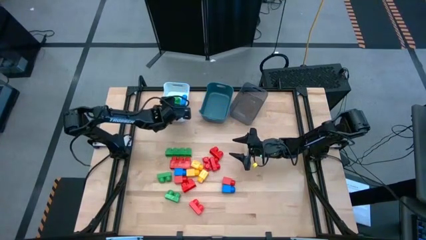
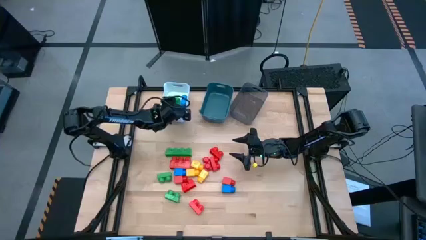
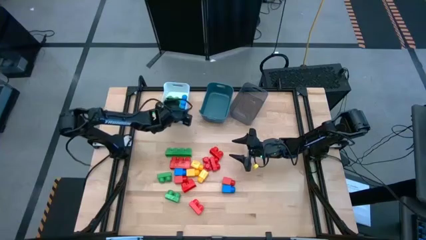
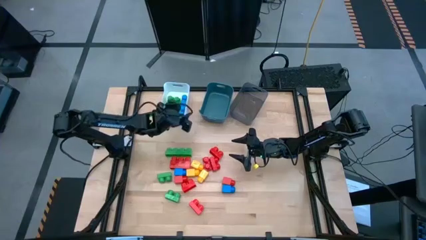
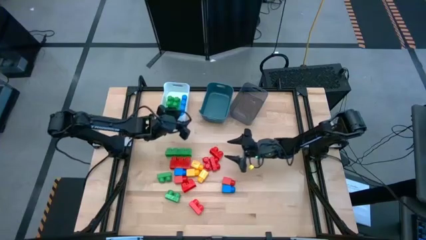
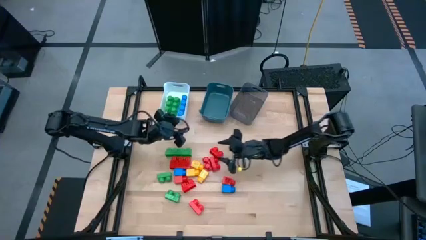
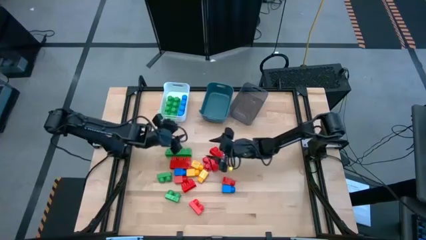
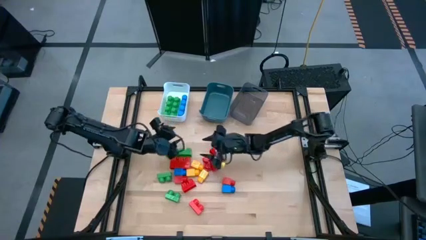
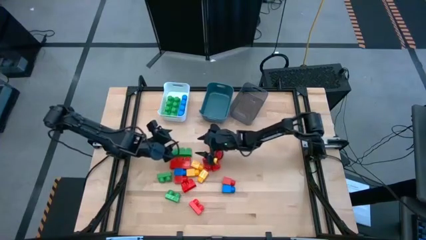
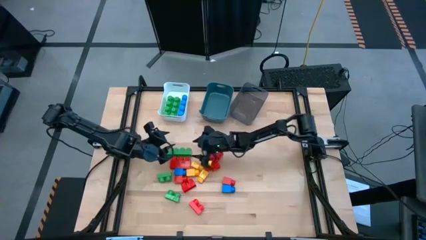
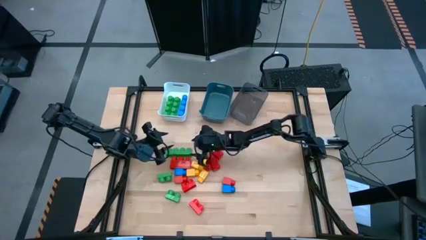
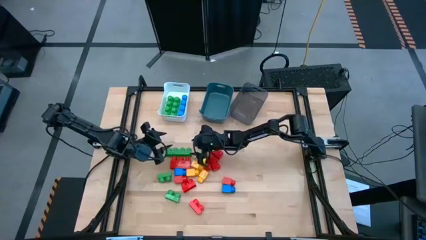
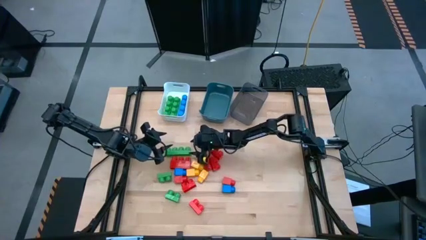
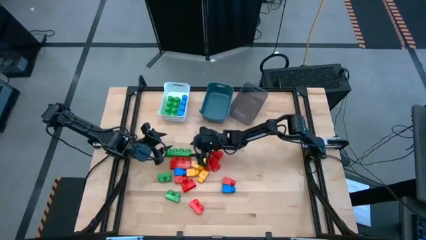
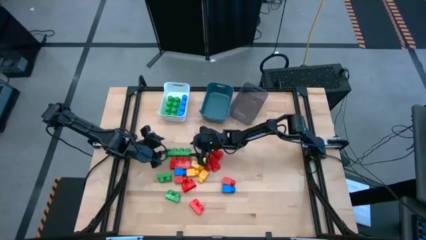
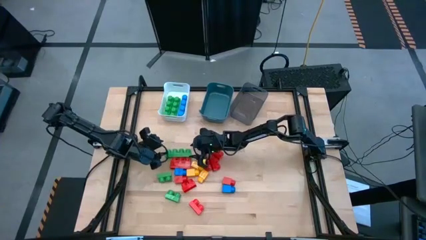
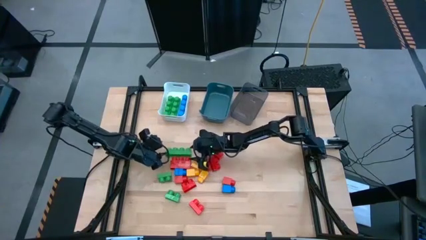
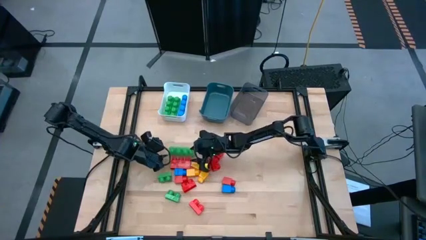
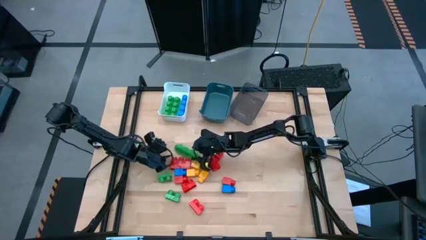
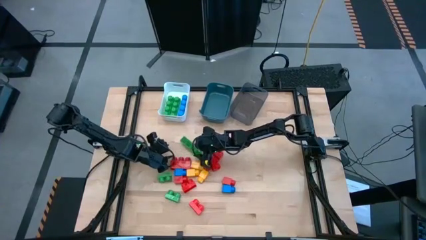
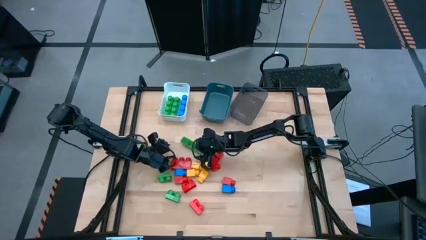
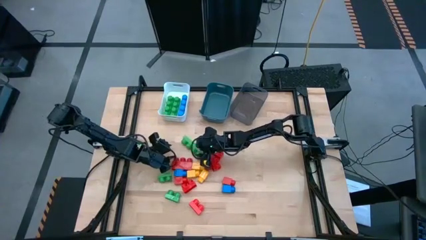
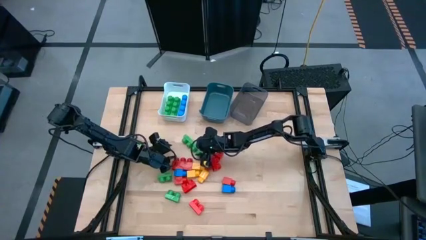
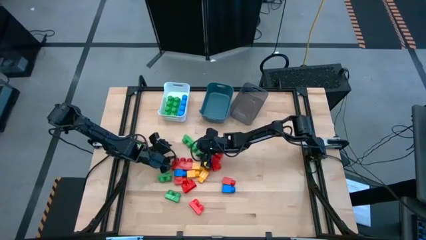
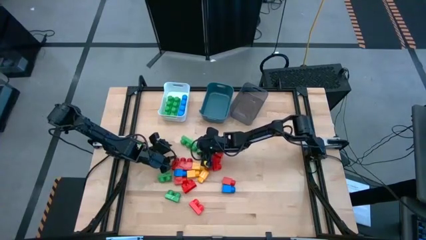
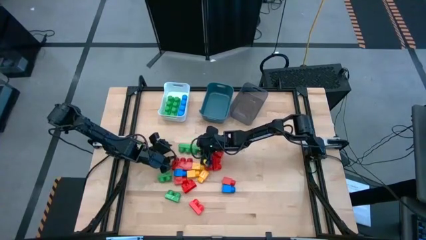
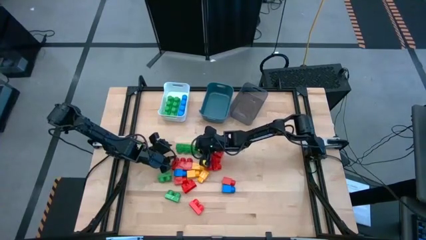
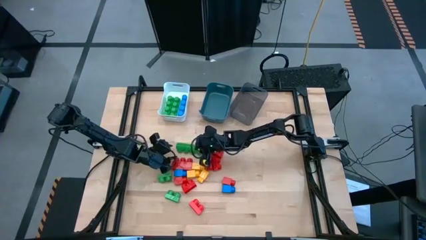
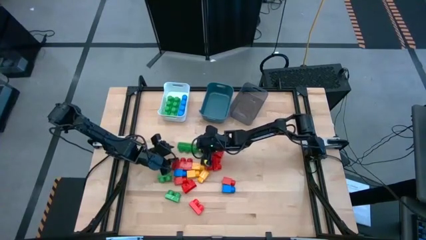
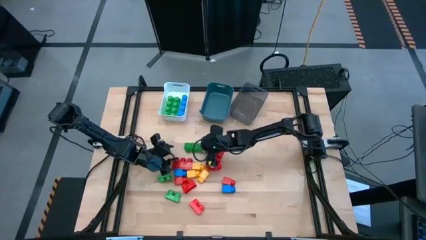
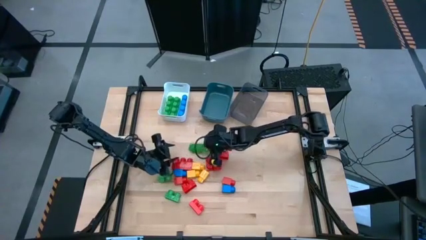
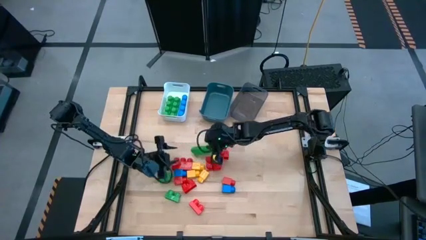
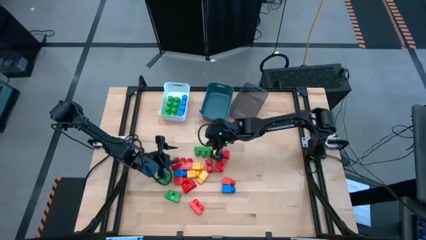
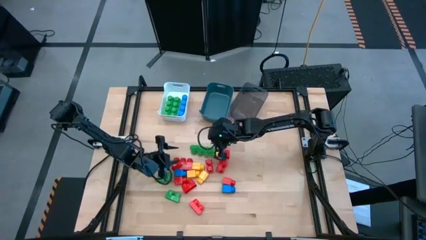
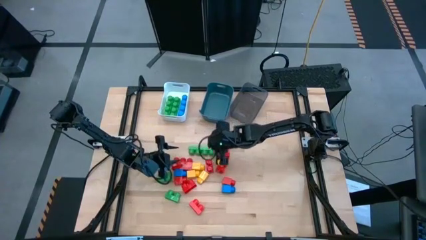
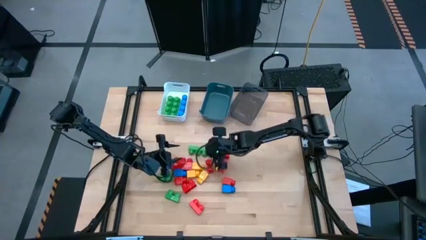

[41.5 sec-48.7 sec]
Task: Sort blocks by size
Put the 4 studs green game piece into the white bin

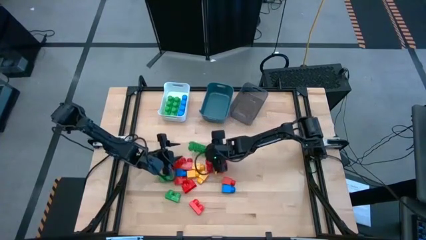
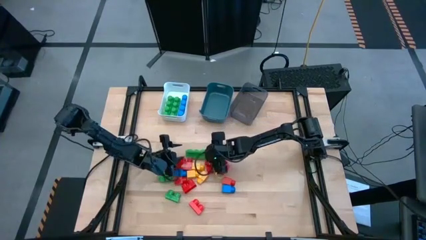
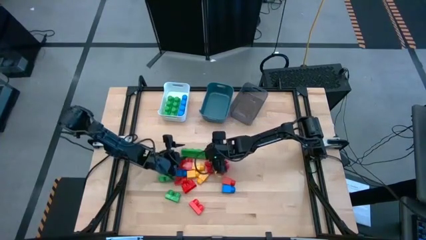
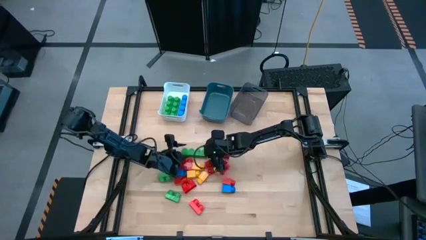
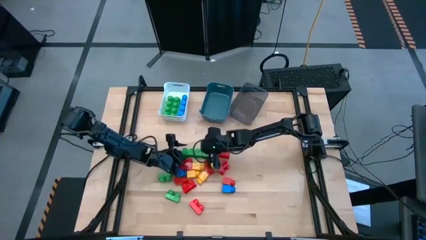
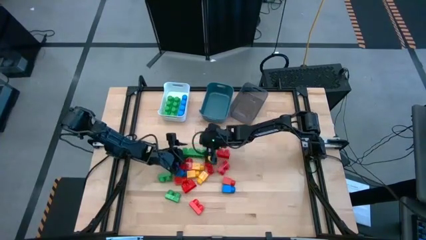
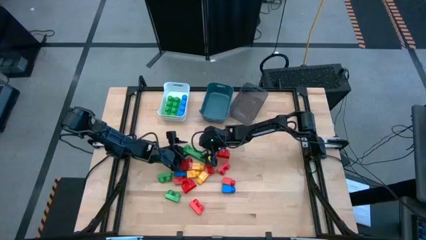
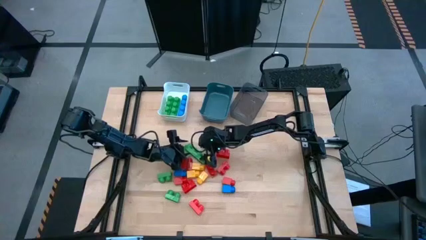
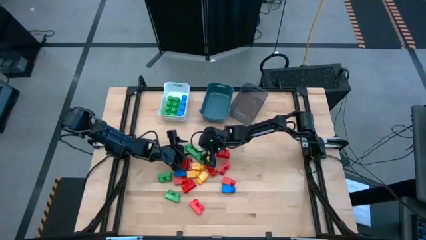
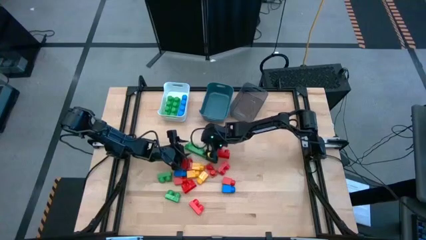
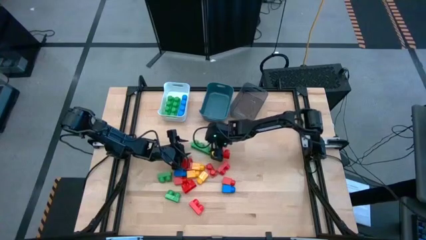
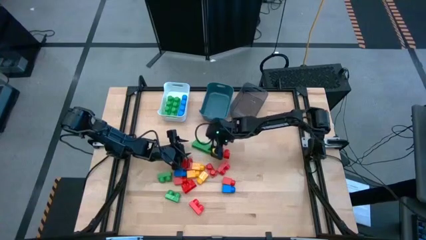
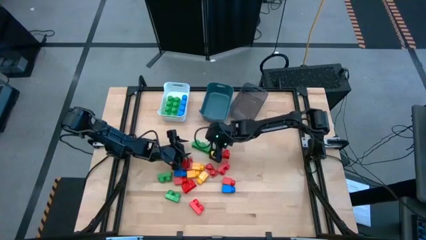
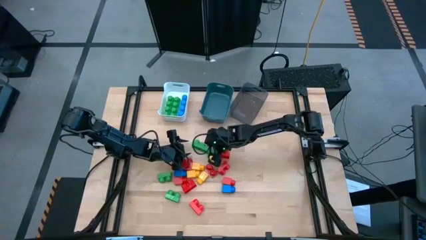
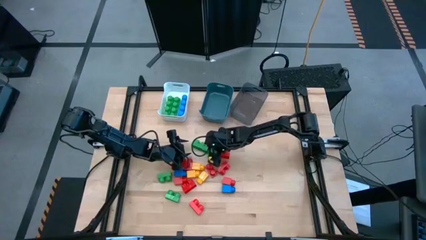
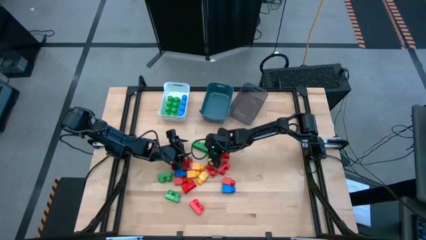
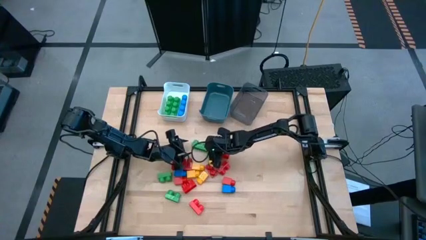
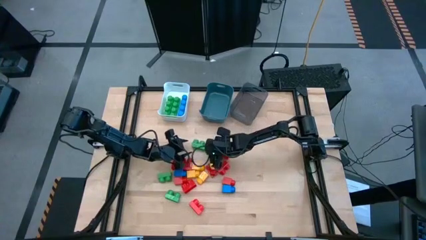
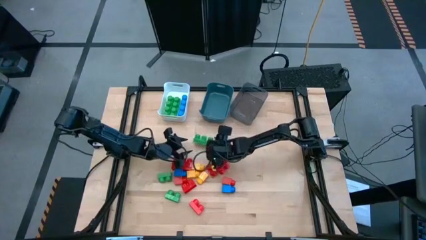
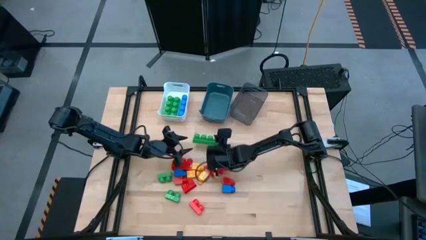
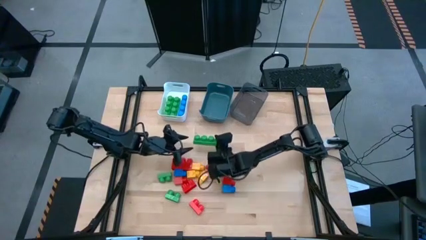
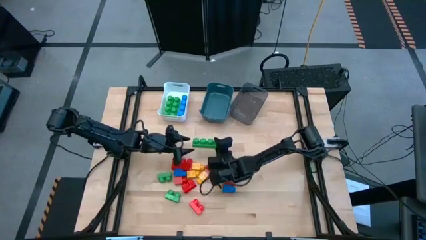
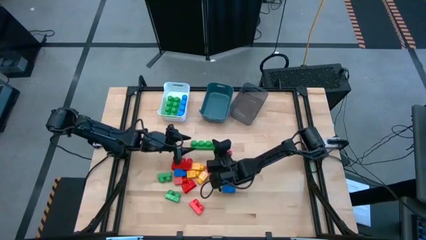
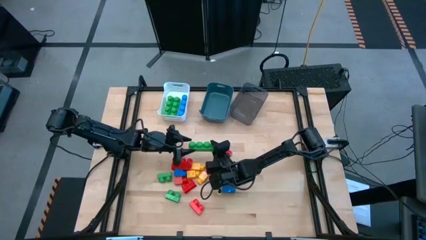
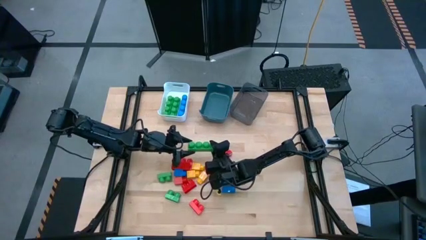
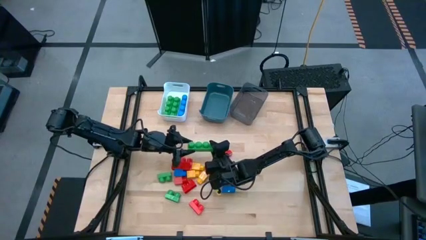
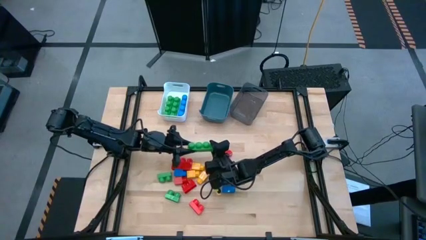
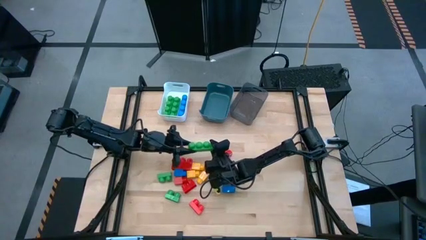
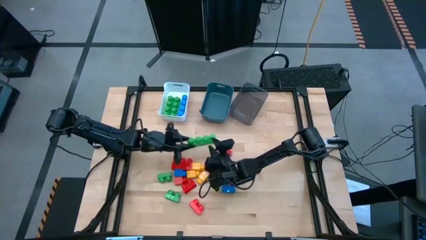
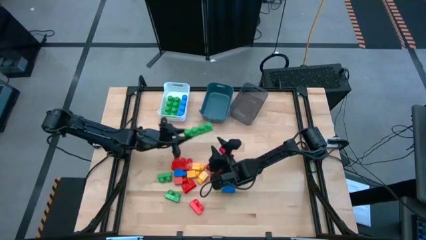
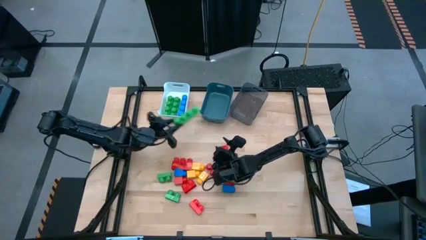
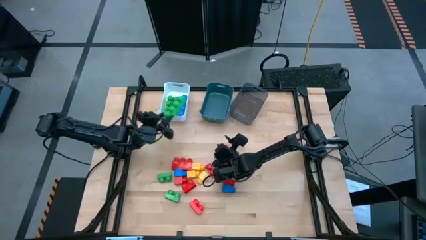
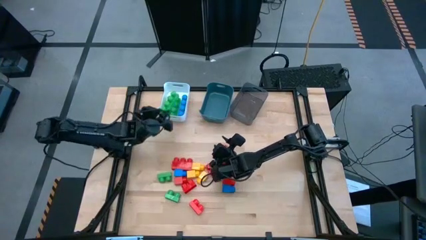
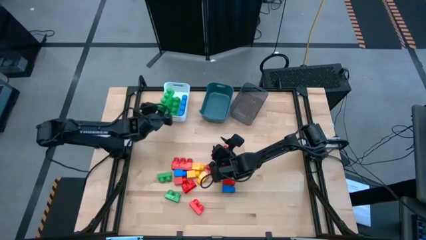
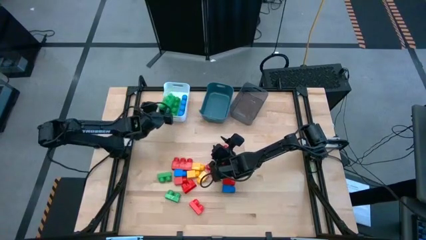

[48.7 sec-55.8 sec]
Put the 4 studs green game piece into the white bin
